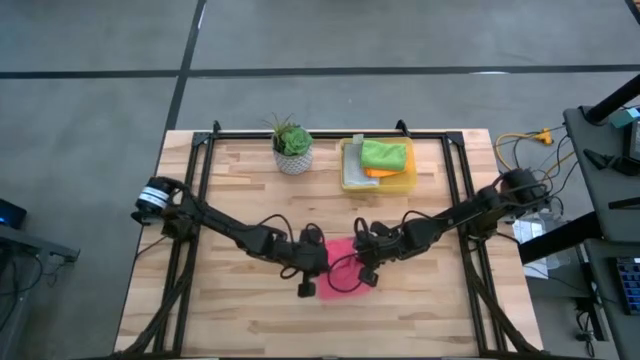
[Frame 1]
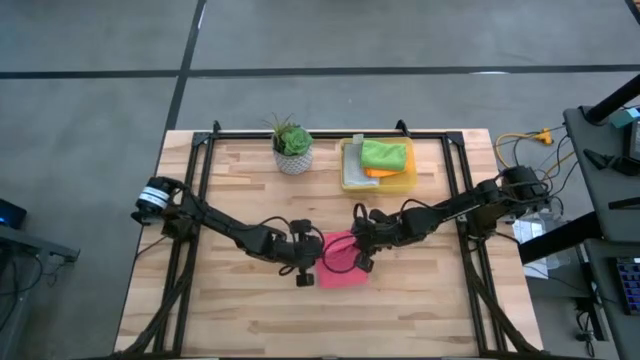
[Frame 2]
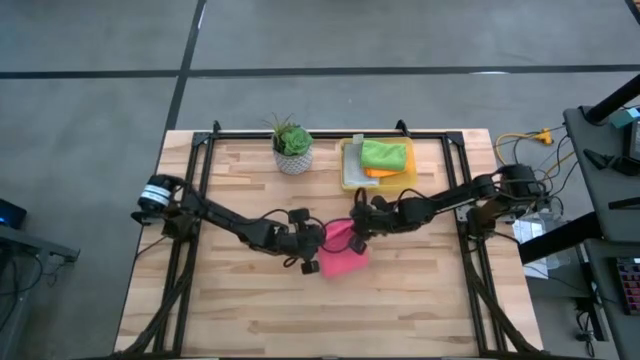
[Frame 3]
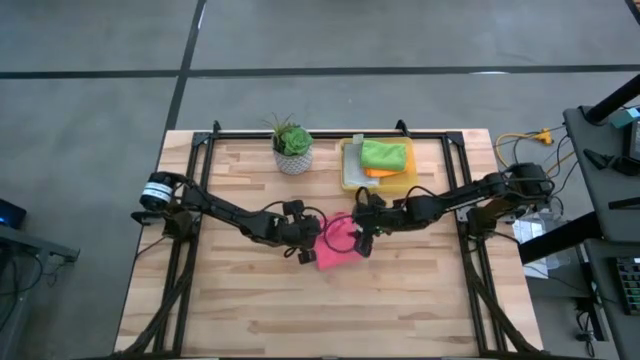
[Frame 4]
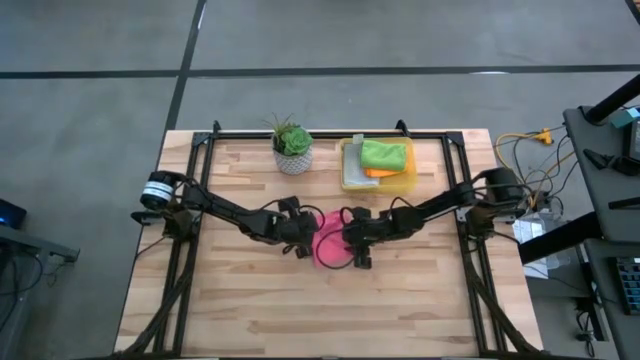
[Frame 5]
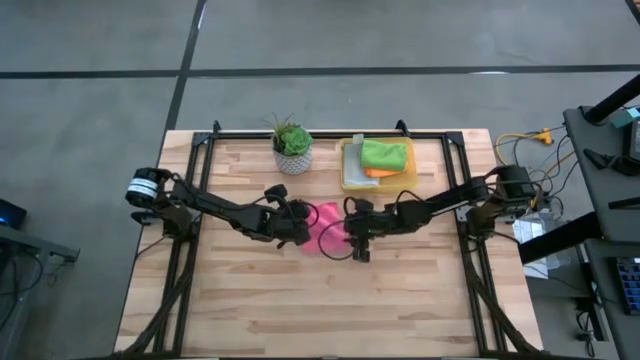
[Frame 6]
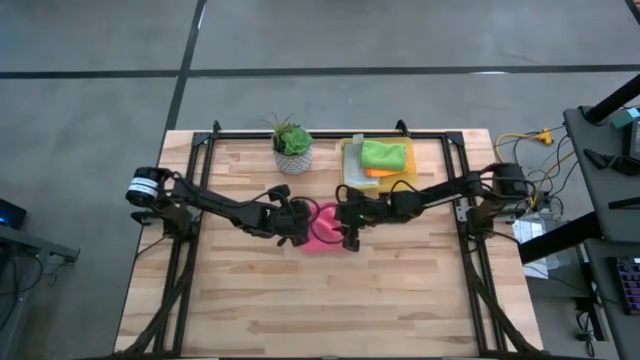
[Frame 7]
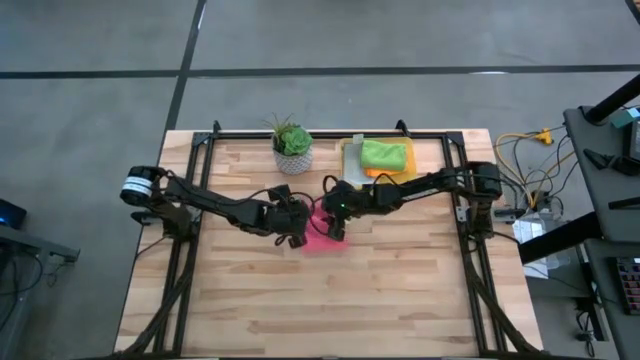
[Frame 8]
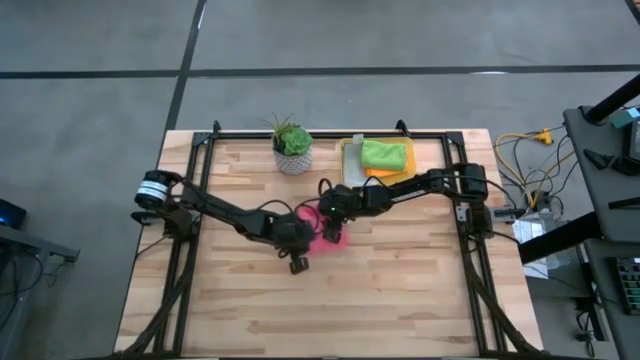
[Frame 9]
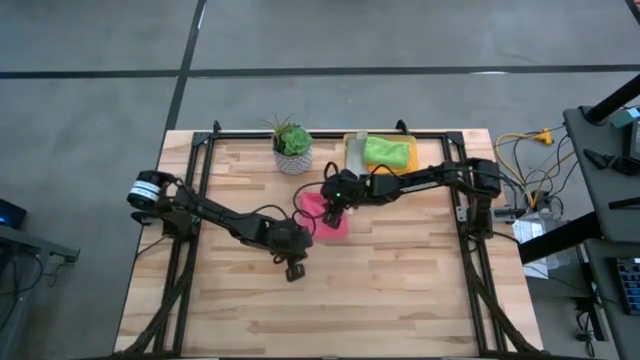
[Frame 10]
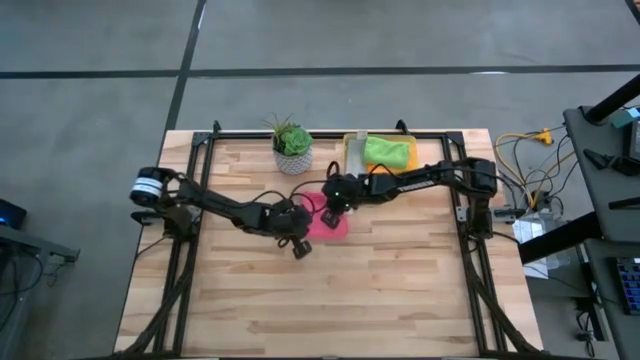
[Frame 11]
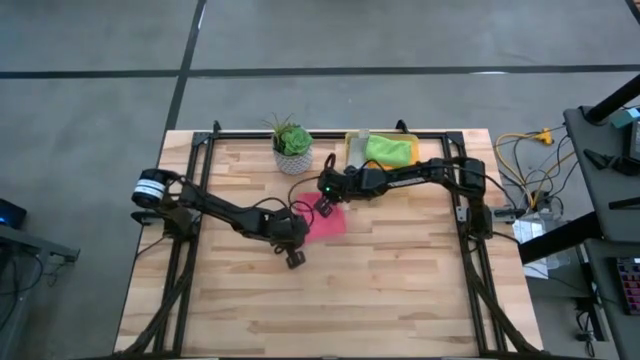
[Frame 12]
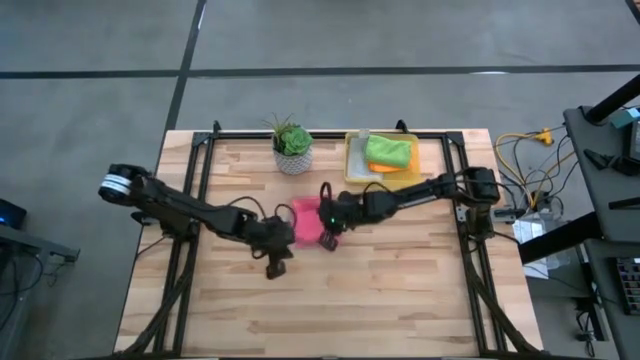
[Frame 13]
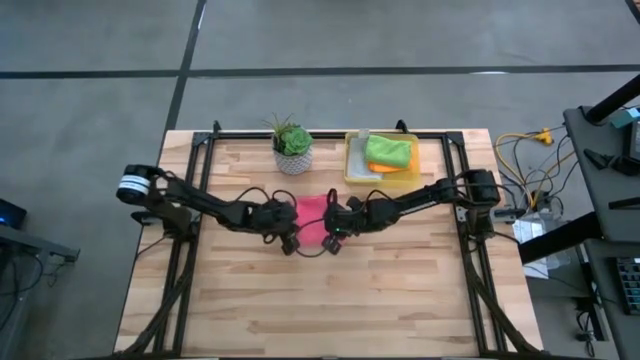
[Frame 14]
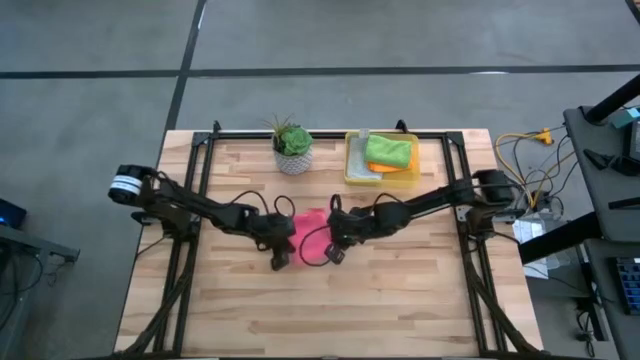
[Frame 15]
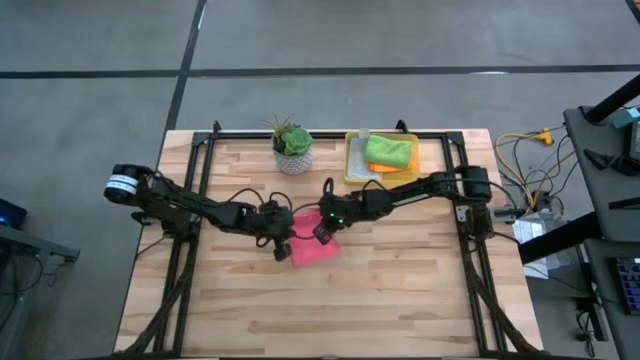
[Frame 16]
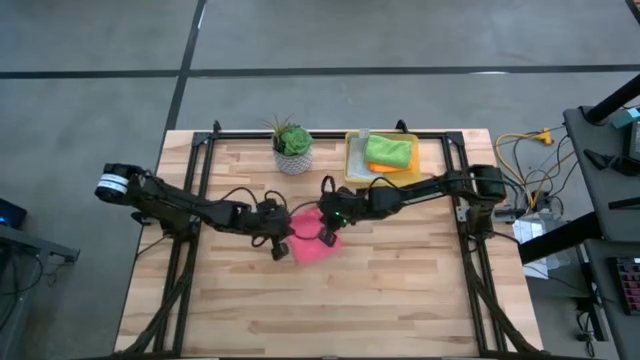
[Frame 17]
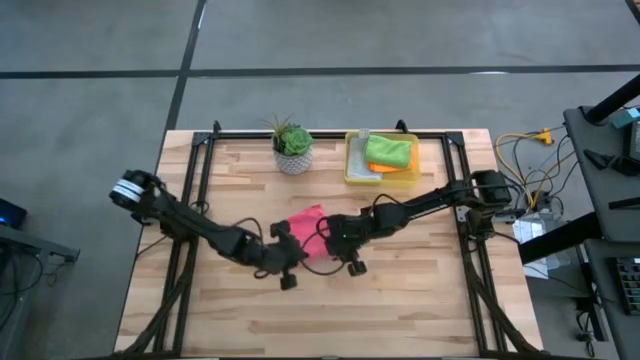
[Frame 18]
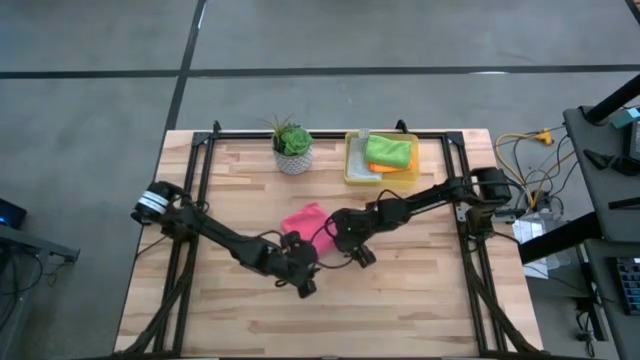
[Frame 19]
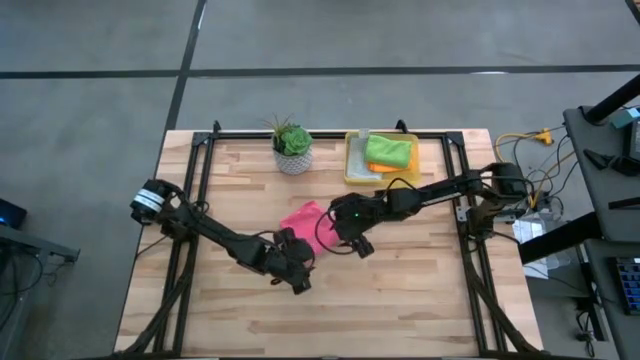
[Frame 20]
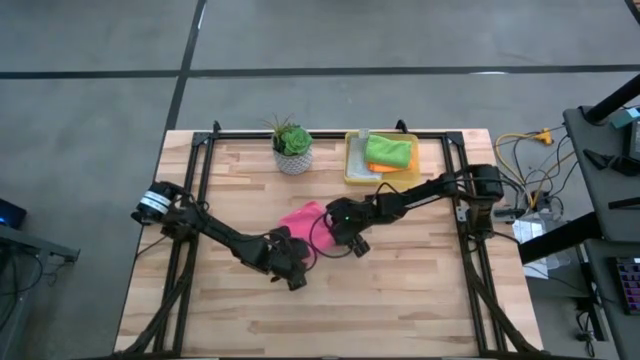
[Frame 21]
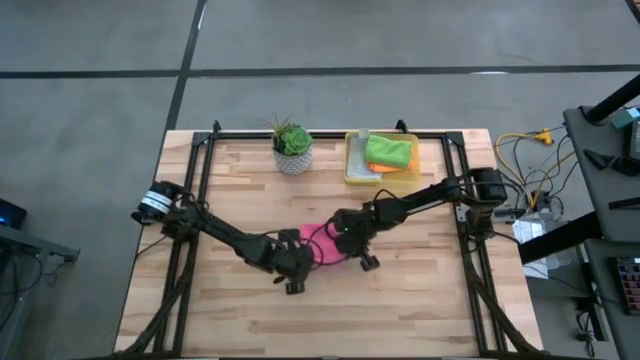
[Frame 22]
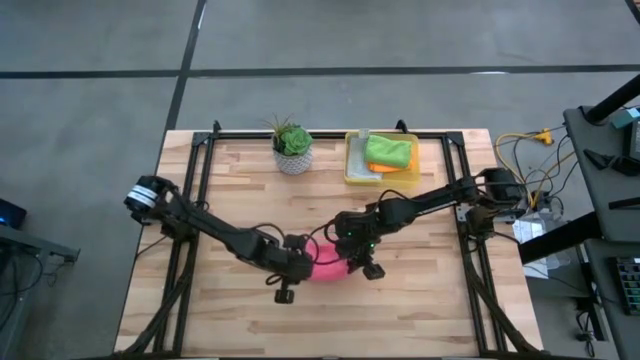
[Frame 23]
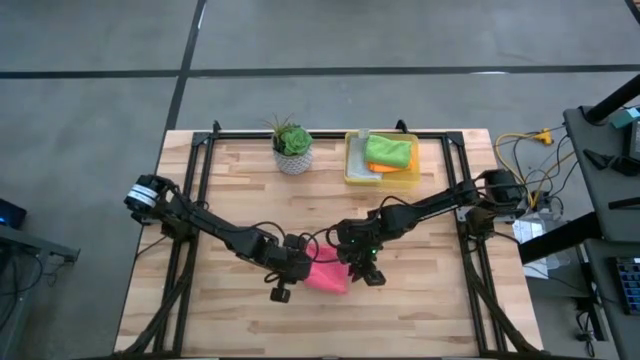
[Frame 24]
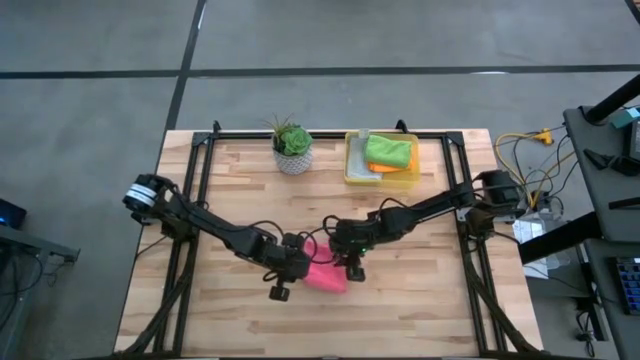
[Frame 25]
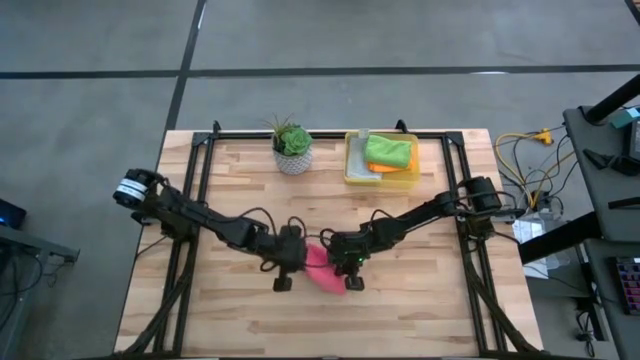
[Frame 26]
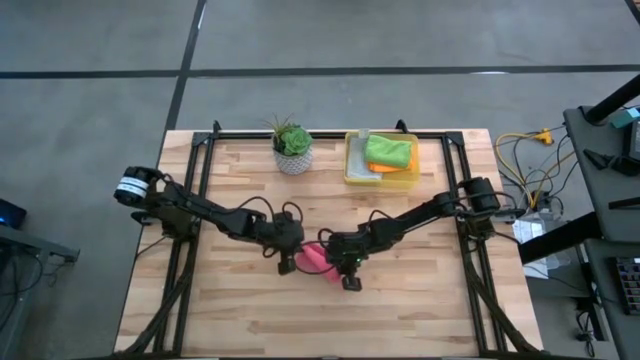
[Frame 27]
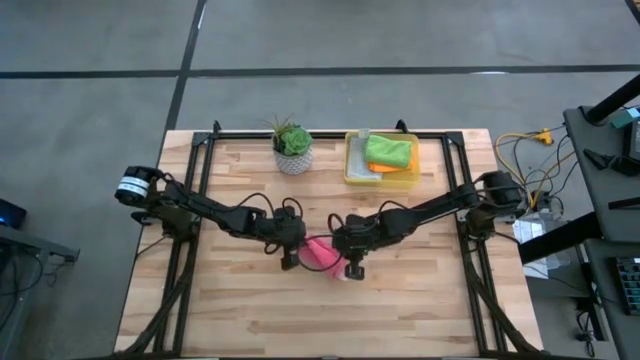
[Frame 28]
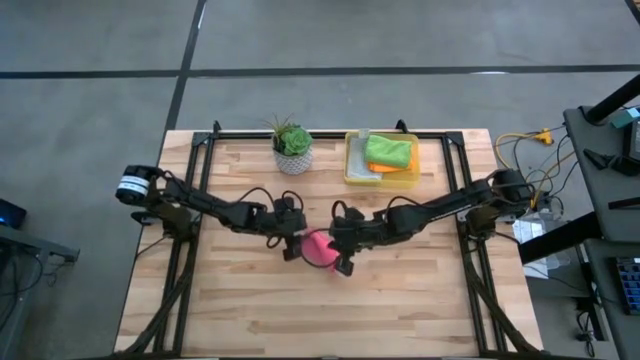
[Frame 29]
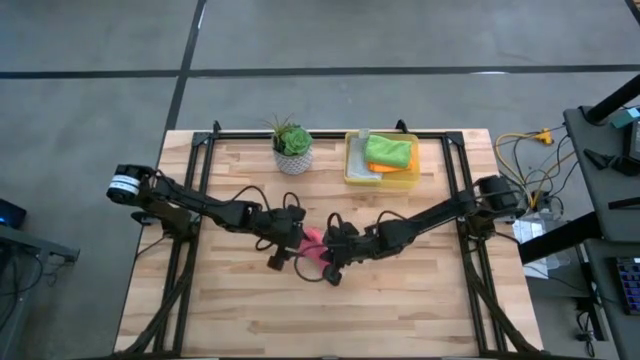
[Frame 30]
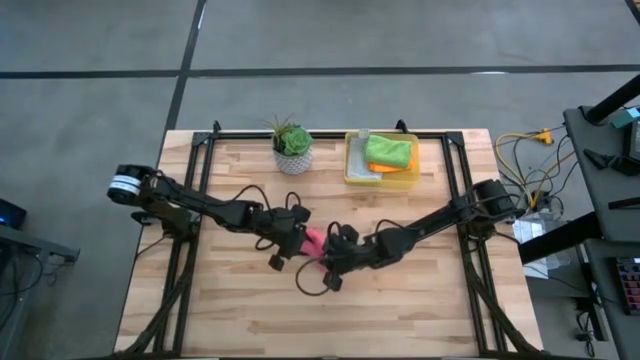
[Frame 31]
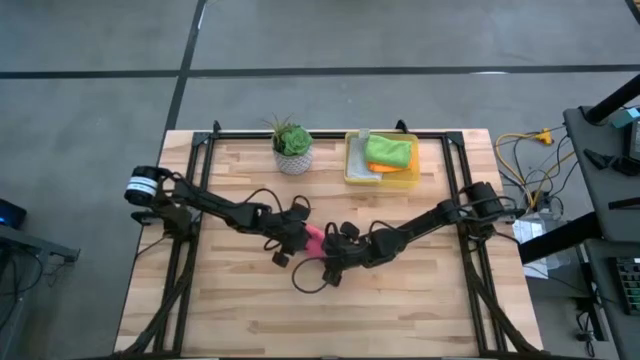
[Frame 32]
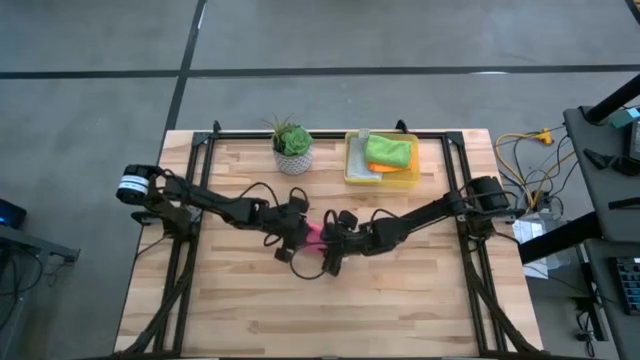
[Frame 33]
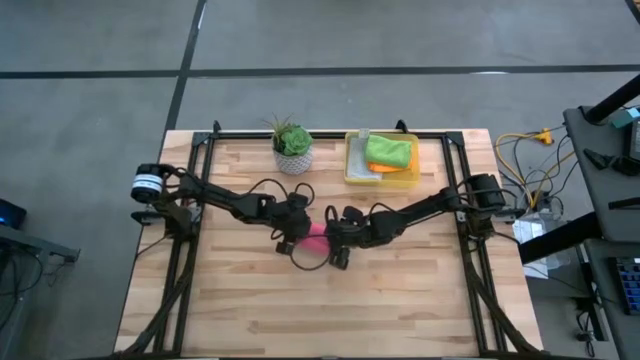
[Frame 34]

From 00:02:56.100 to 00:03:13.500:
Task: Fold microfiber towels
Fold the pink microfiber cloth

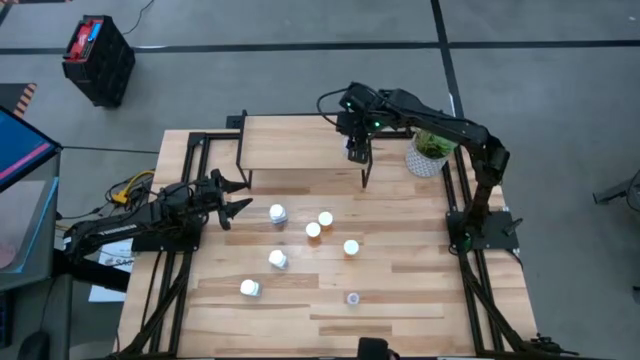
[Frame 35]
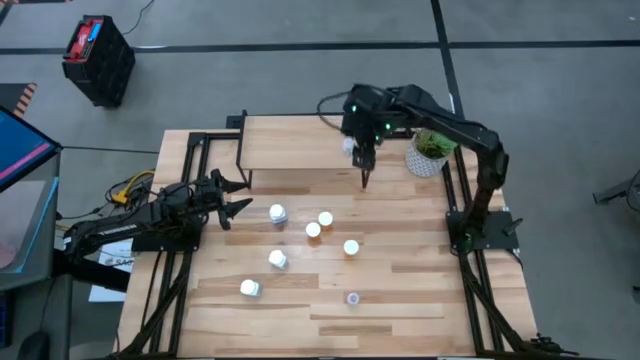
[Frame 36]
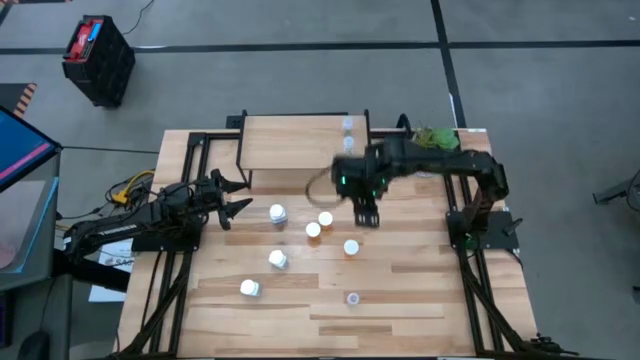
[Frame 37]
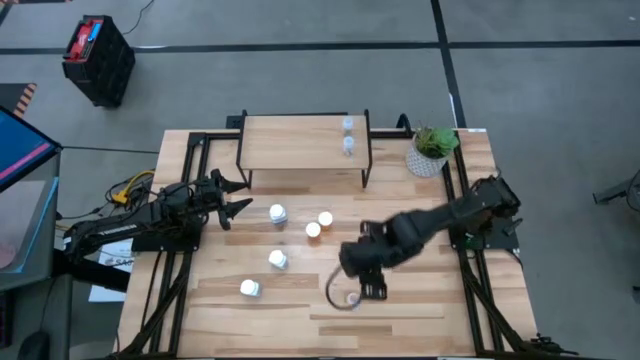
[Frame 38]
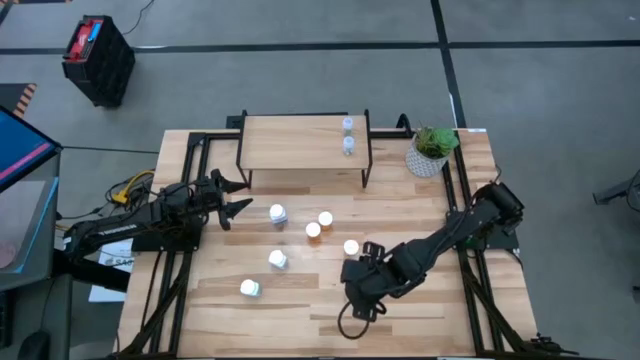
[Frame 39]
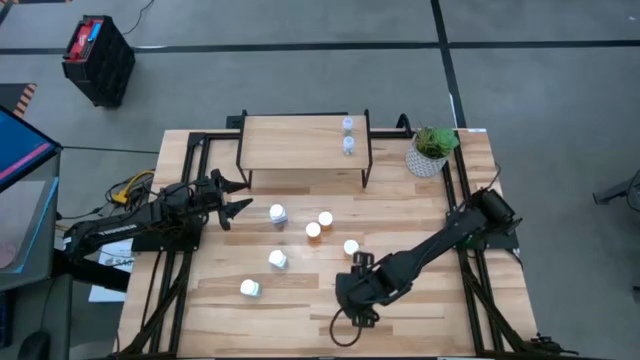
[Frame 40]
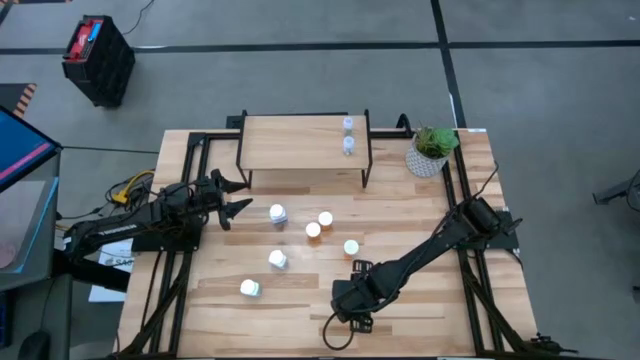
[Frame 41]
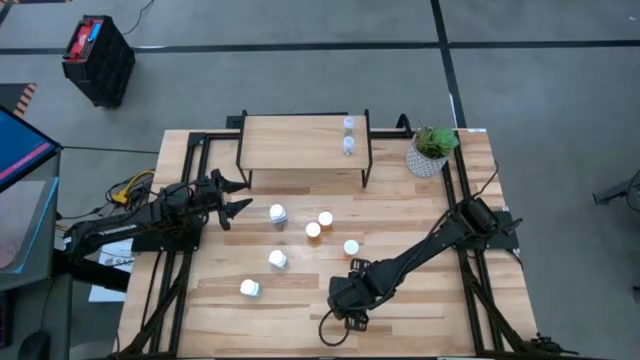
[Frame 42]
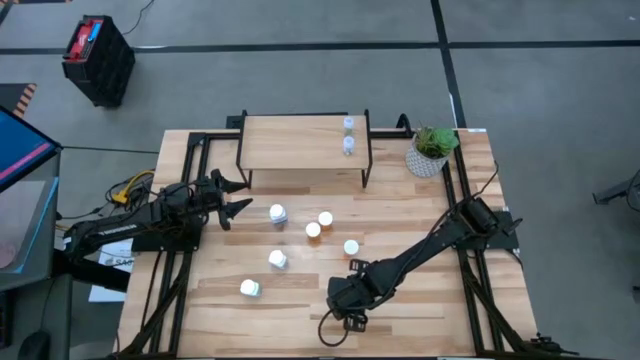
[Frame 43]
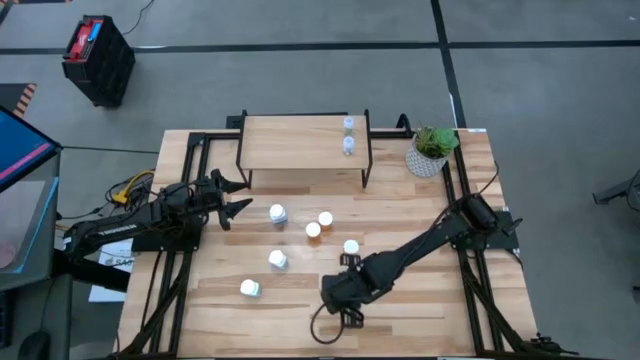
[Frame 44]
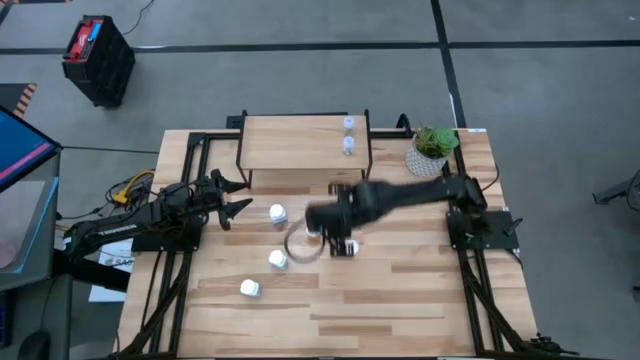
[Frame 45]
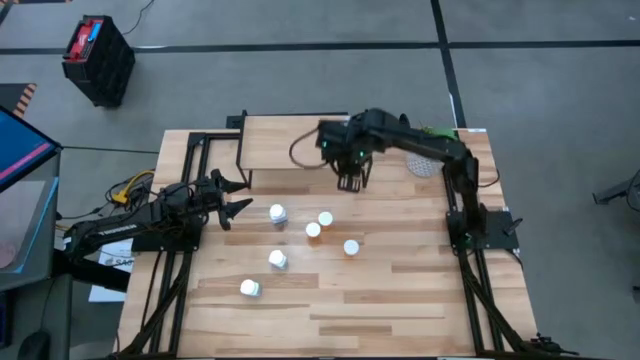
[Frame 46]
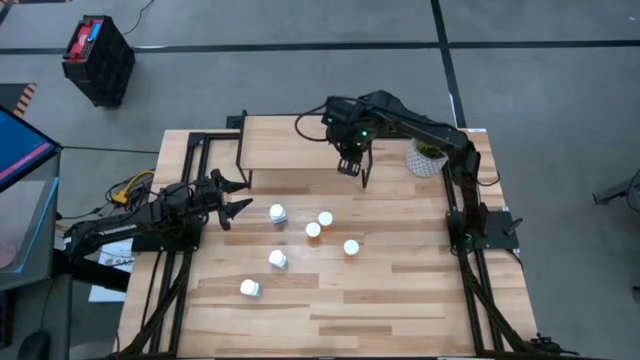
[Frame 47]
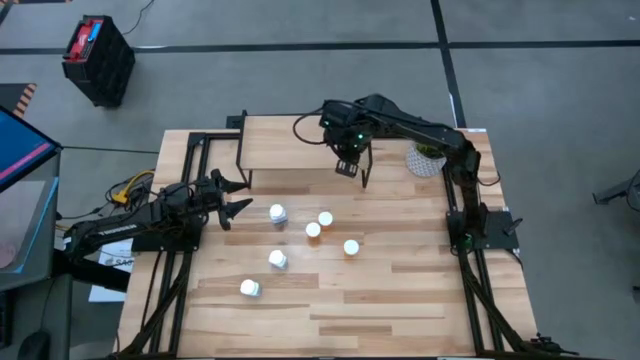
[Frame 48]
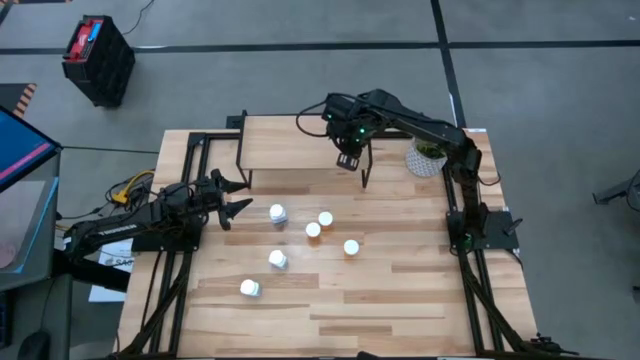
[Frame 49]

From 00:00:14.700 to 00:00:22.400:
Task: Pick and place medicine bottles onto shelf by color
Put the transparent pill bottle on the shelf aligned with the other transparent pill bottles
